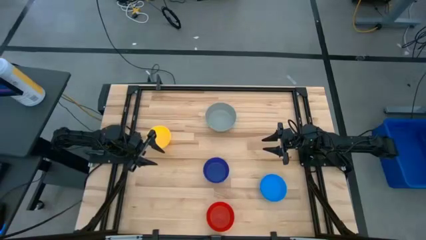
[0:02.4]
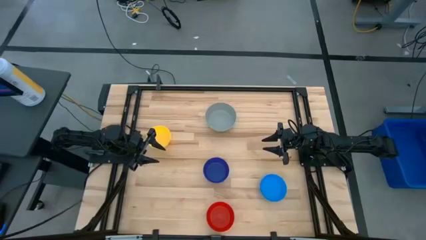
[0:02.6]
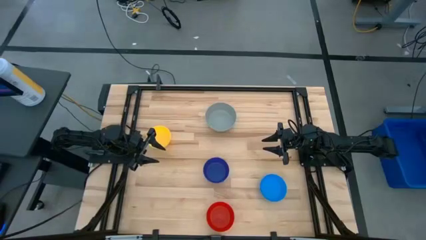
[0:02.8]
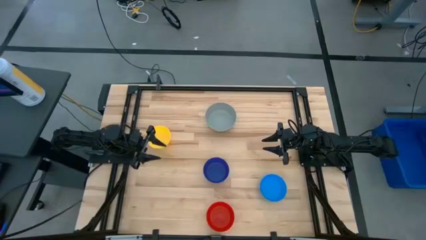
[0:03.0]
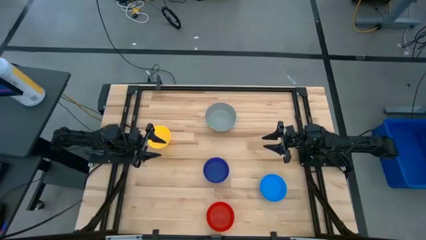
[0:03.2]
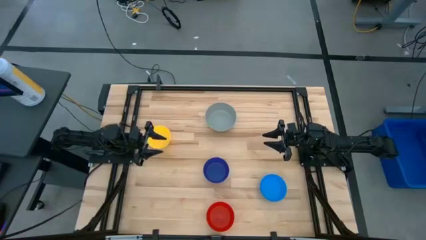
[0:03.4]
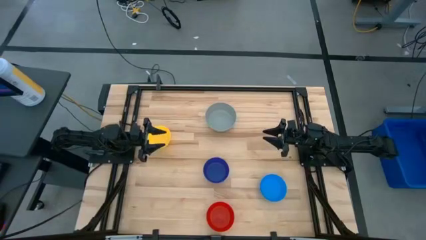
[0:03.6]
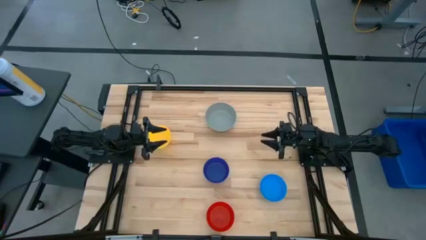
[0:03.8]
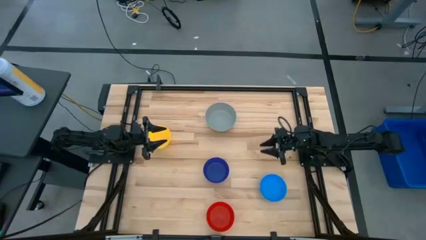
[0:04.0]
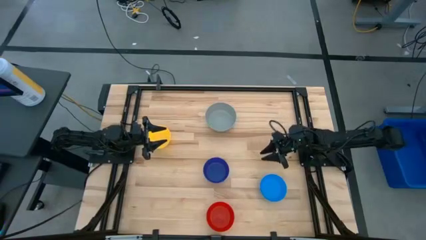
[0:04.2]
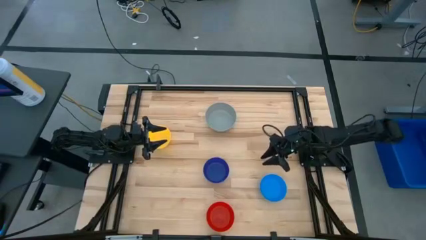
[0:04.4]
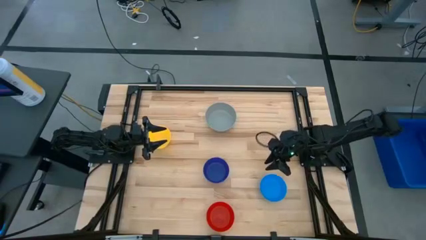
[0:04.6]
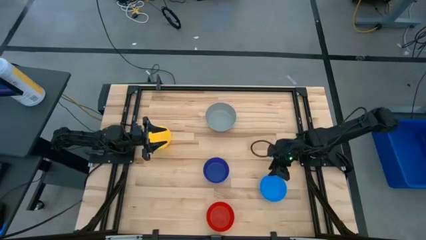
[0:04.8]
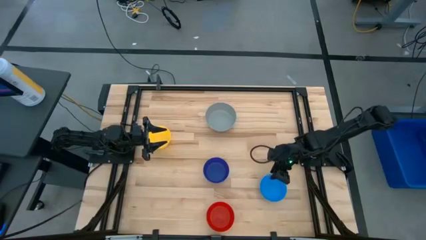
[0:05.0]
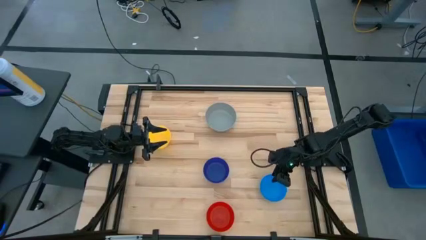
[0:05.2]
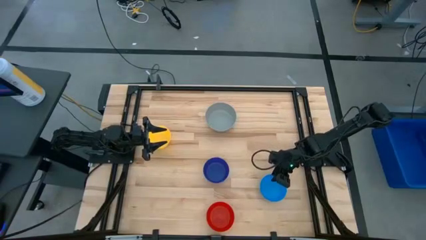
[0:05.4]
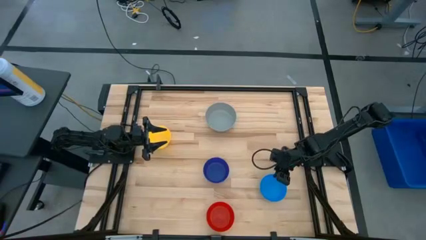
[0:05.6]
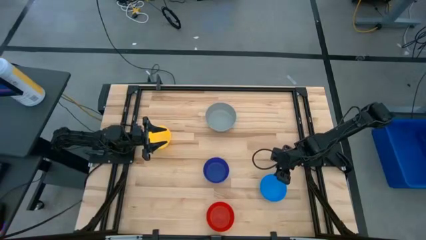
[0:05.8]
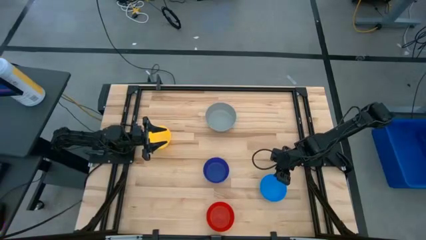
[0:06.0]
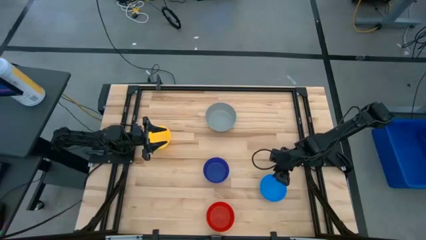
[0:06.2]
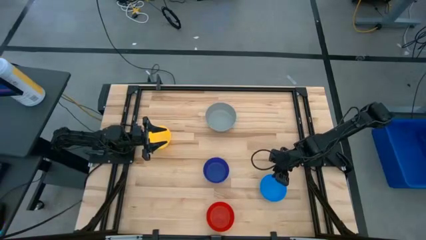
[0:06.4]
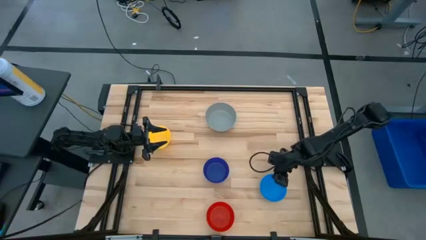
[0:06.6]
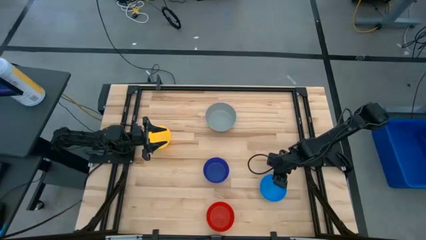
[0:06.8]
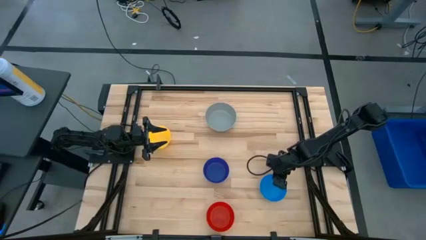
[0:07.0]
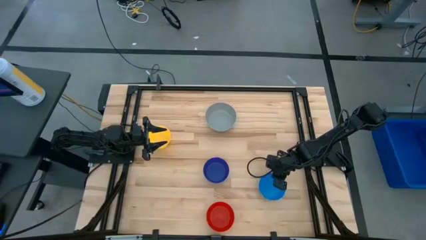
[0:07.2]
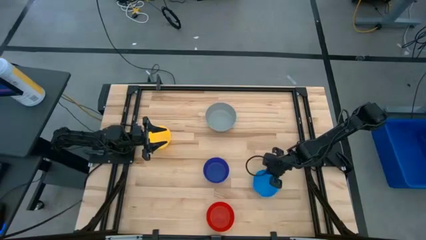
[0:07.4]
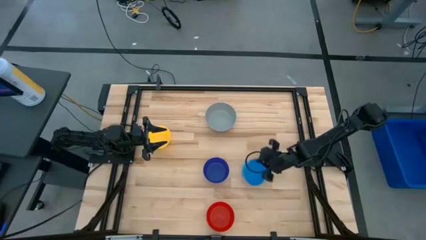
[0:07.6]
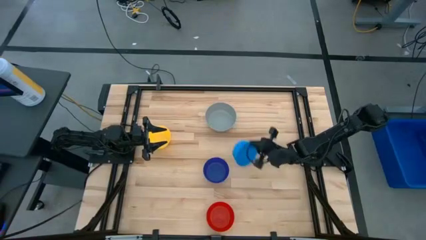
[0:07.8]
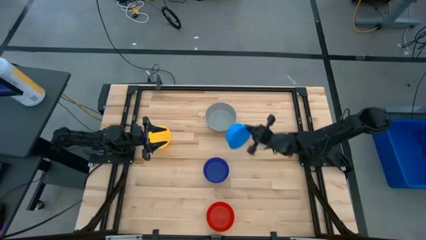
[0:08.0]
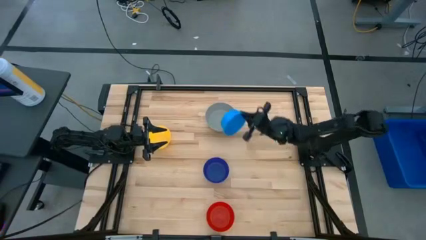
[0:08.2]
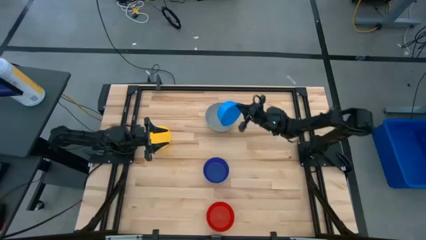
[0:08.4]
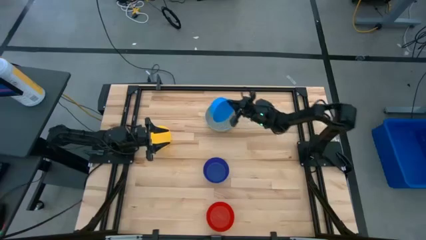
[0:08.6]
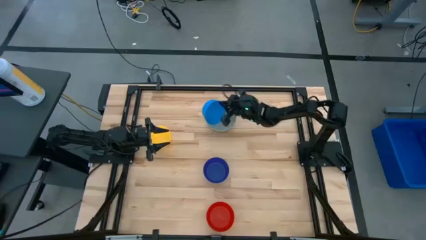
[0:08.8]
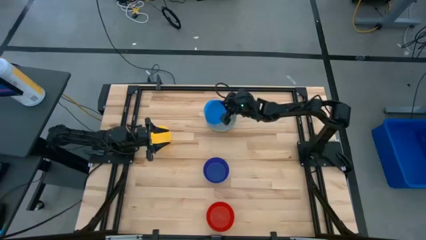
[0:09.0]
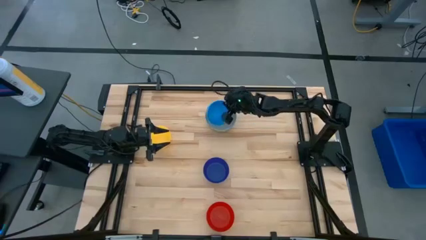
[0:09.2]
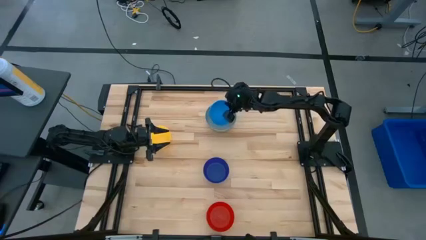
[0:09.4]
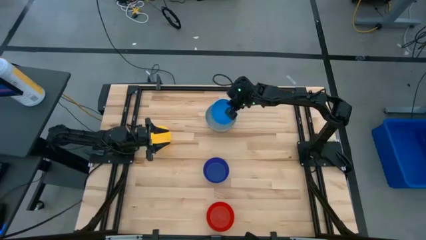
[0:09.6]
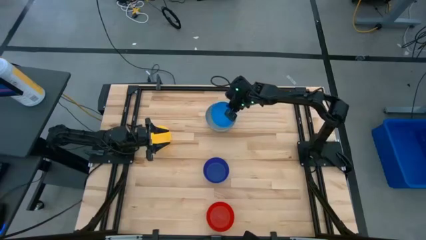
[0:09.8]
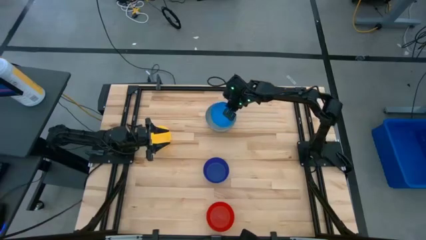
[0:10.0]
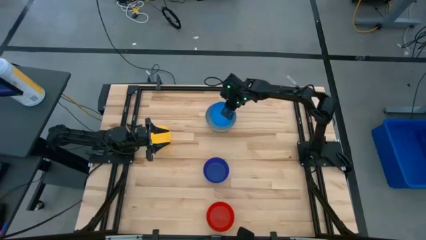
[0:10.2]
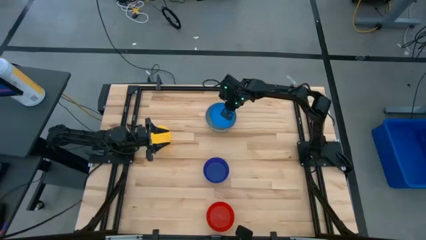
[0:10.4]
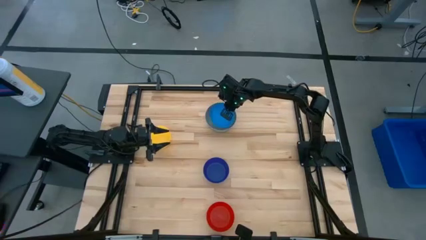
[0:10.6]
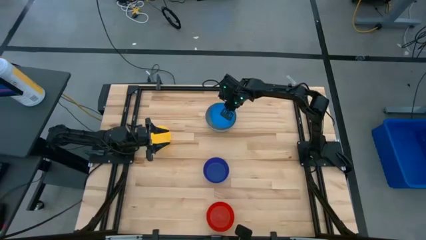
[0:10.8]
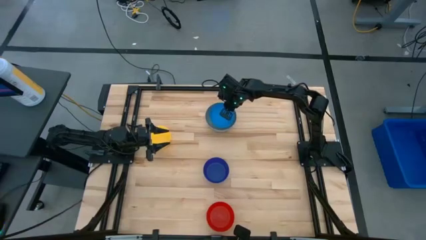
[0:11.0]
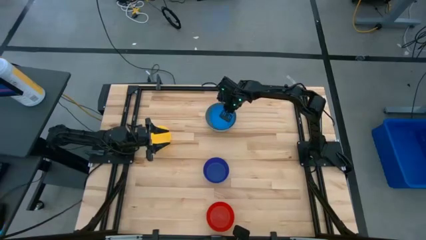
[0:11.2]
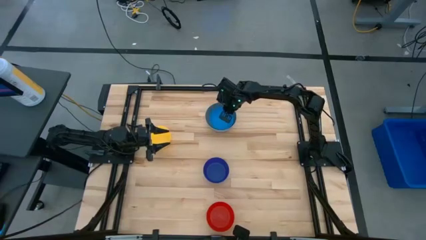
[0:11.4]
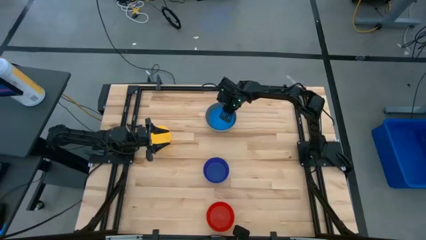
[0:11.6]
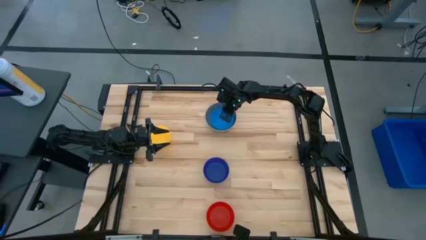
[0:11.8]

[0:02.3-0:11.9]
Stack the blue bowl on the gray bowl

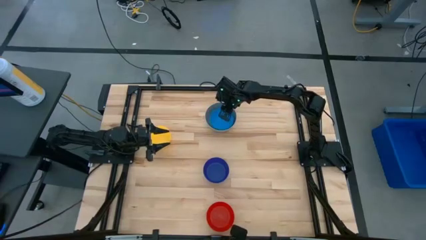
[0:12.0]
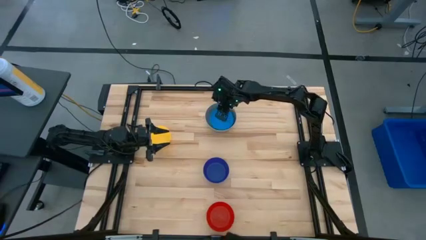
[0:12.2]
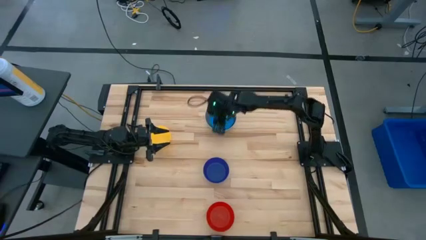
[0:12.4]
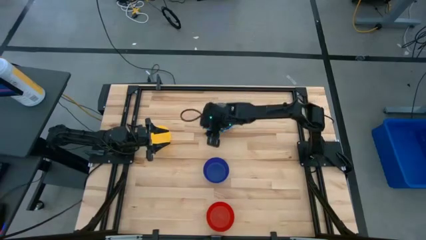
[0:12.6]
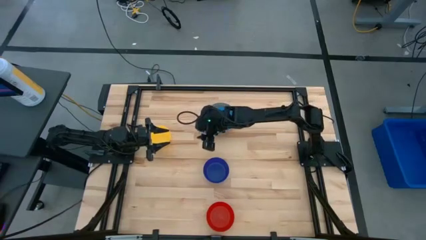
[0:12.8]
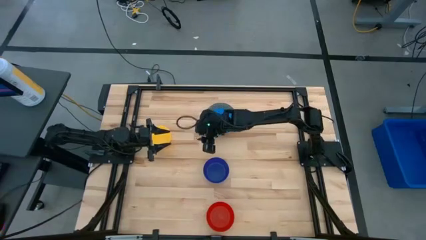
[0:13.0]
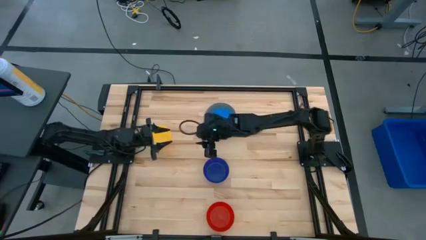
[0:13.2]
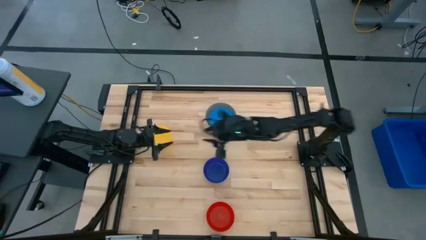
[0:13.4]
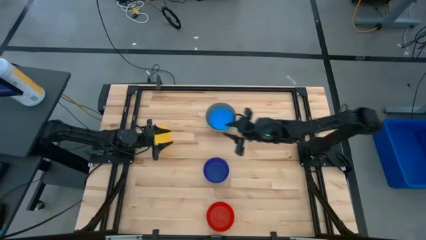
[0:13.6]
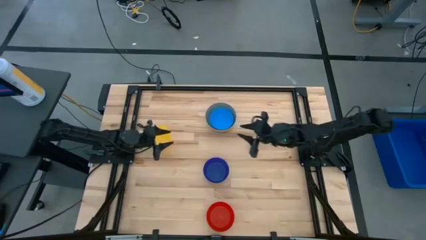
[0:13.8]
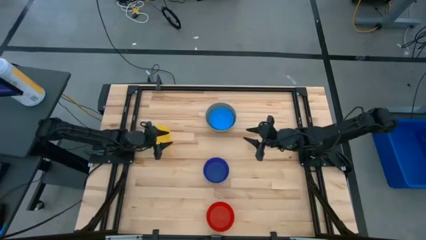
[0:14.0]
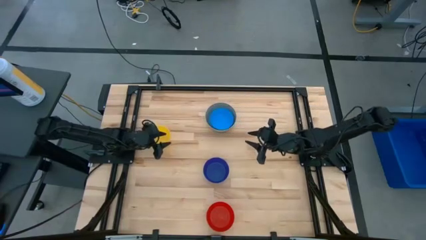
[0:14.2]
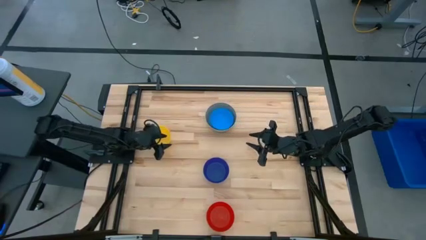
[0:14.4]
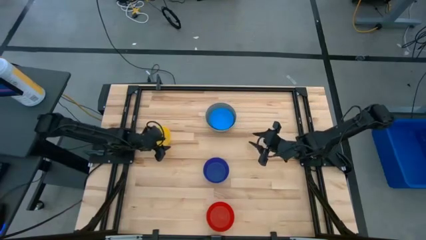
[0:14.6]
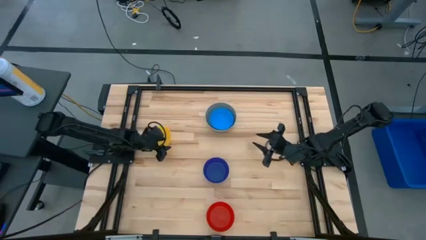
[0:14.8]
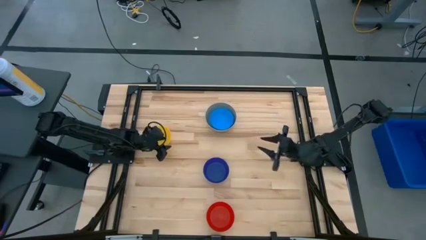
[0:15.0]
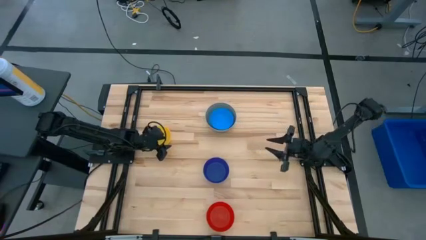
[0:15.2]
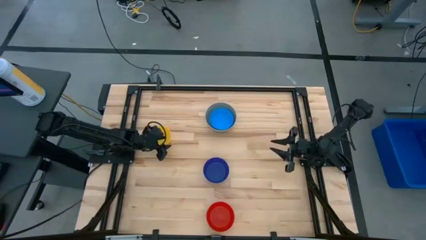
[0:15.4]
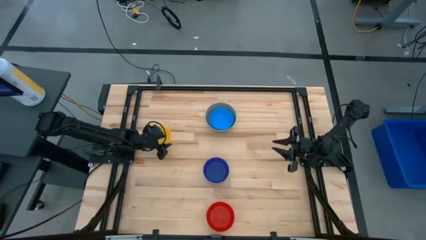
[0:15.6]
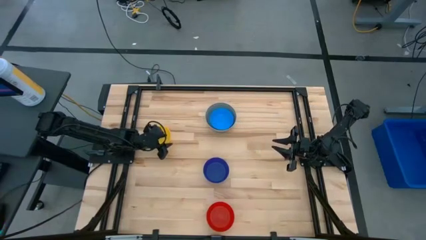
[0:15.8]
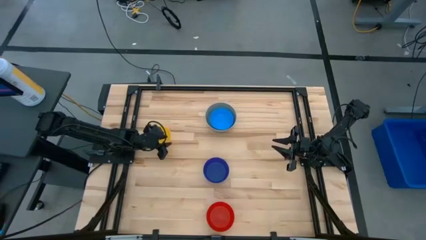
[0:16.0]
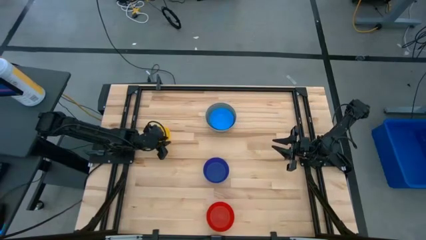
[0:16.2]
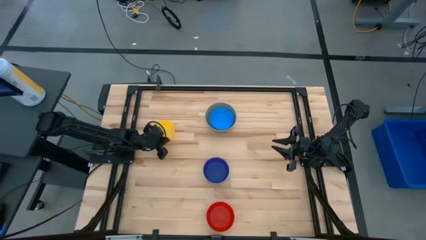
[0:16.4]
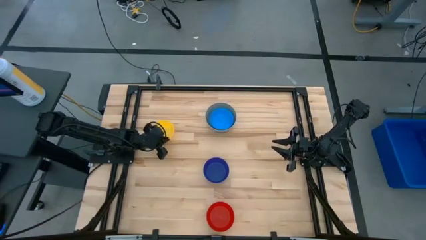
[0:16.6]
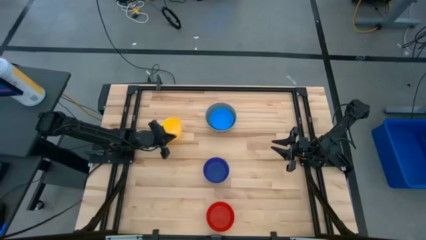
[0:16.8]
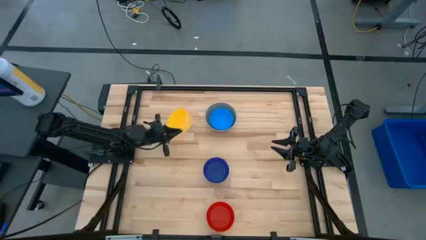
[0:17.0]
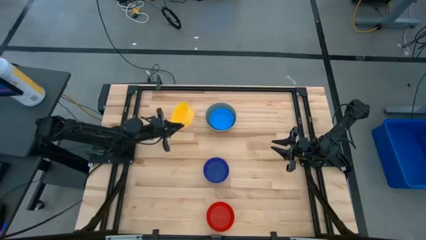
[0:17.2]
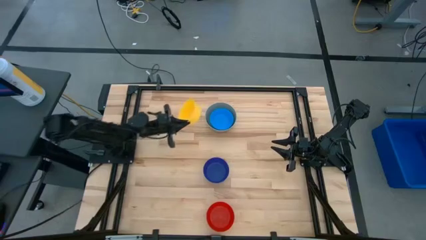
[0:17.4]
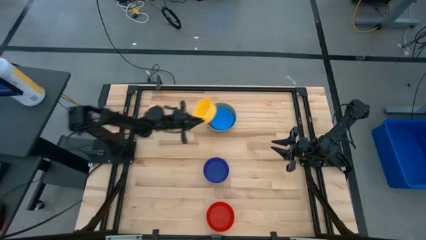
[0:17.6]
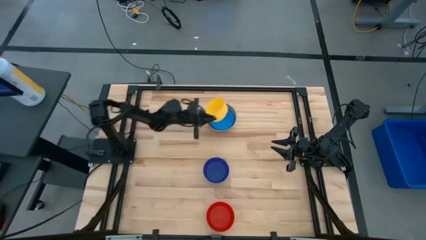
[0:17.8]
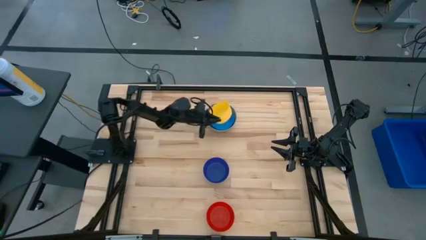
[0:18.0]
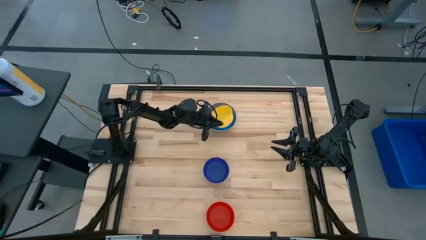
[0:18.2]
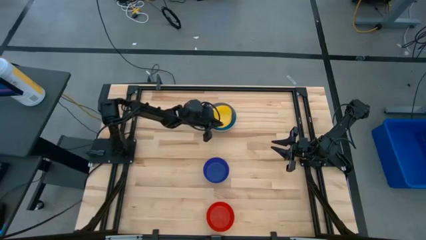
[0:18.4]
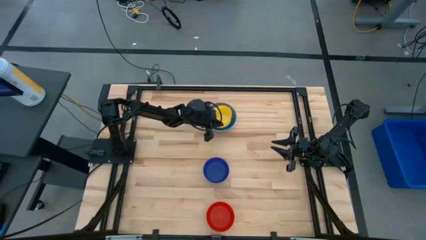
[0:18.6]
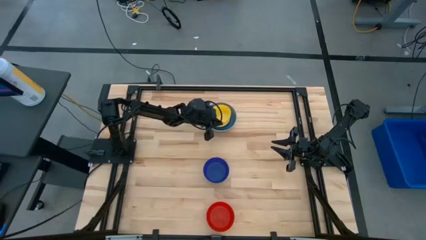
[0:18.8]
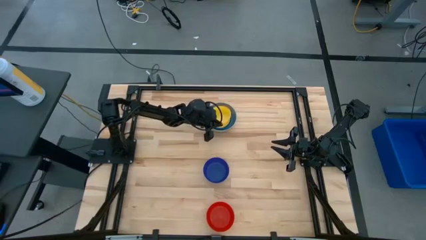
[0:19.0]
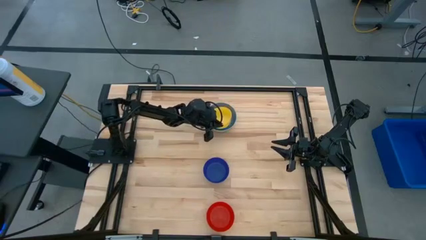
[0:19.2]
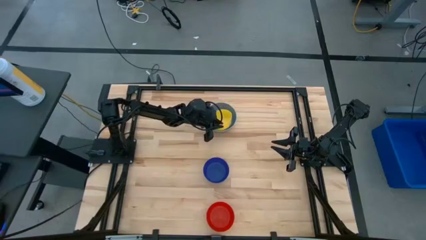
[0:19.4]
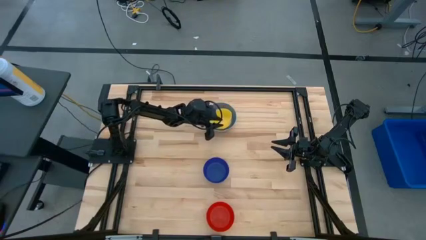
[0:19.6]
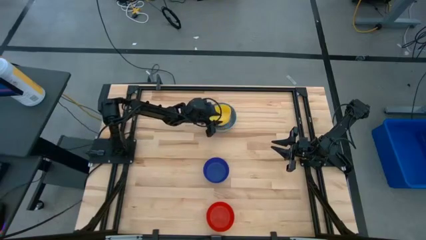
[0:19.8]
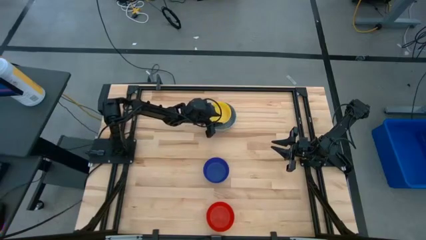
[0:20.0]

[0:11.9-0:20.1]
Stack the yellow bowl on the blue bowl
